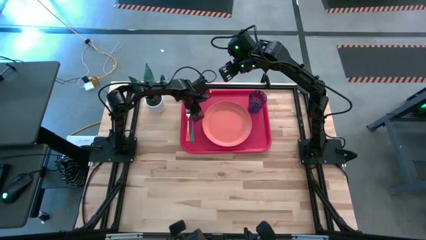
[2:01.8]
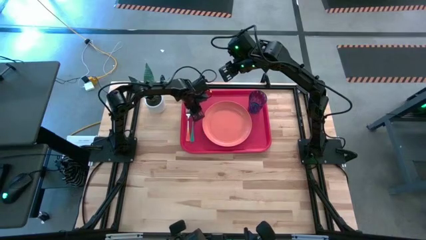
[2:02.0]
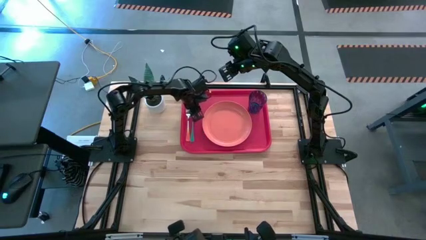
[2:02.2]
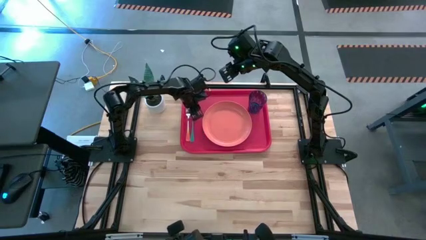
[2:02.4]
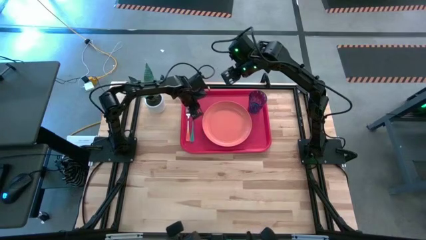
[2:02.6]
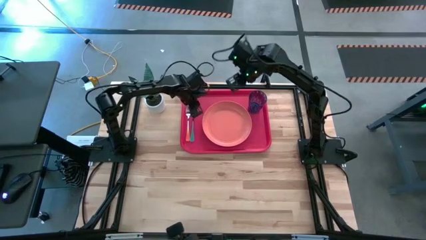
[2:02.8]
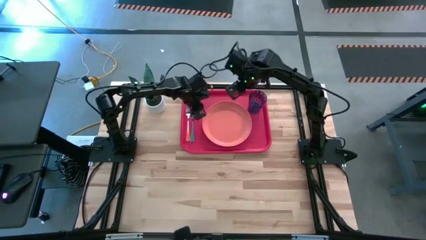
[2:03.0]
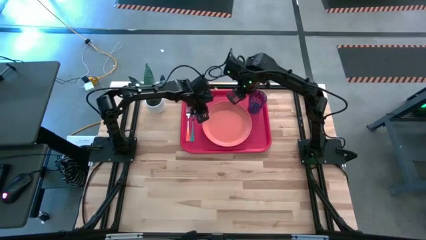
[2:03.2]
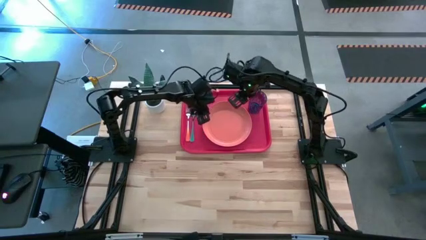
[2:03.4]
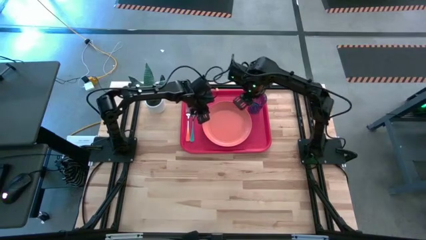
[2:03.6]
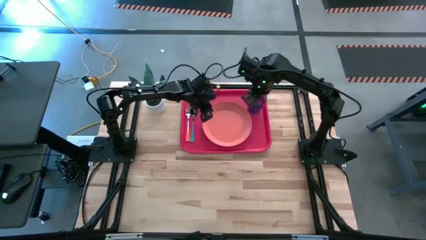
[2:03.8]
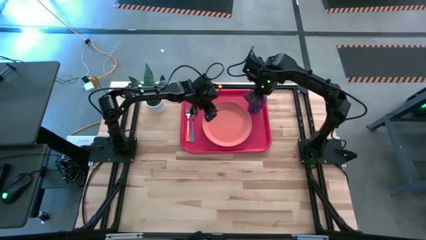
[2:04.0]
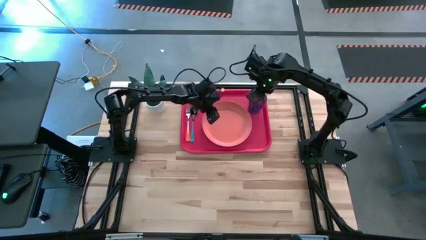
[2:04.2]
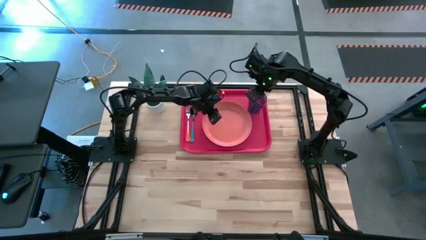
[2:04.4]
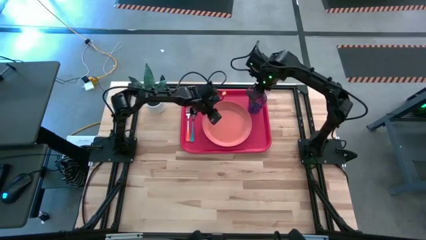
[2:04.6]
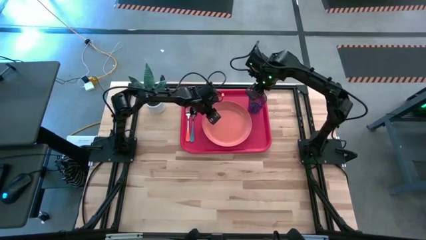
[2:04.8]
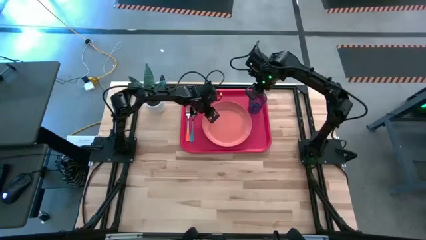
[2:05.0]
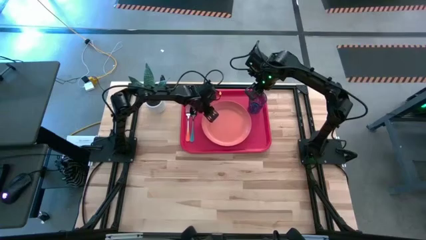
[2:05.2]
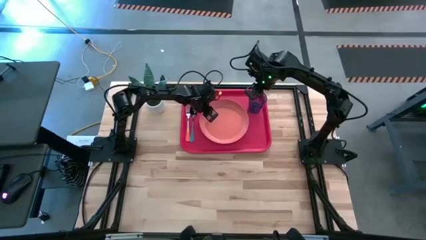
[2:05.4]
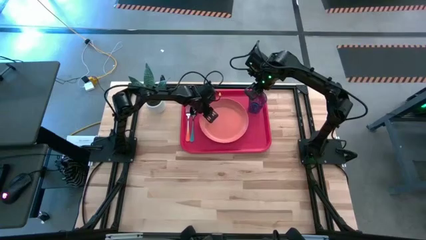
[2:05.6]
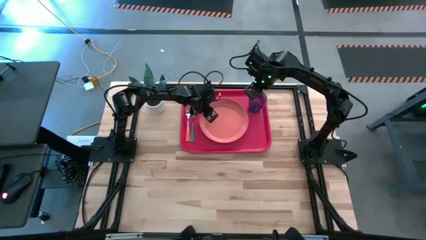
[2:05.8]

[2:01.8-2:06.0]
Task: Pick and place plate/cup/fork/spoon on tray
Adjust the orange plate on the pink tray

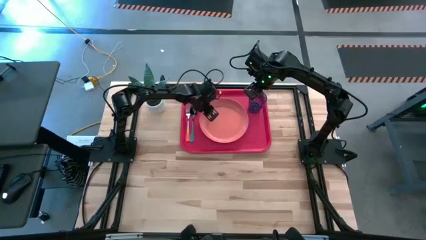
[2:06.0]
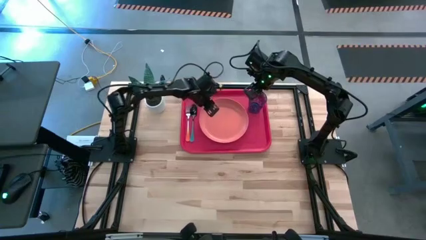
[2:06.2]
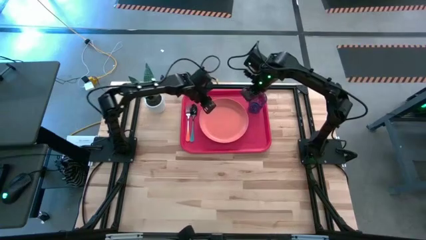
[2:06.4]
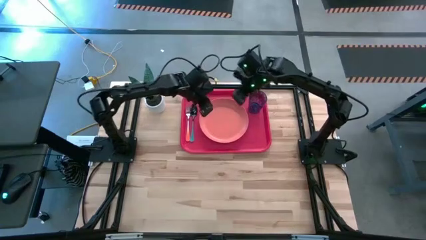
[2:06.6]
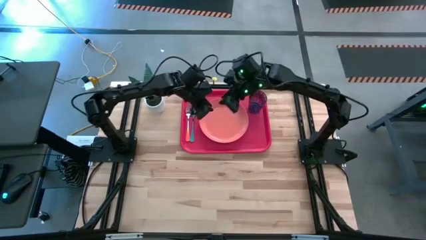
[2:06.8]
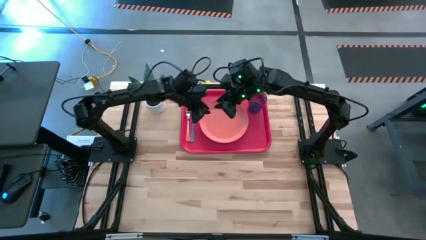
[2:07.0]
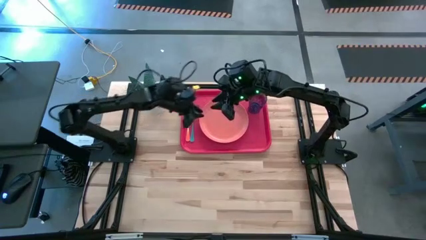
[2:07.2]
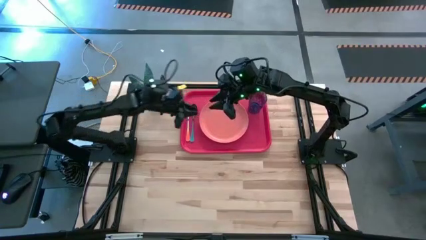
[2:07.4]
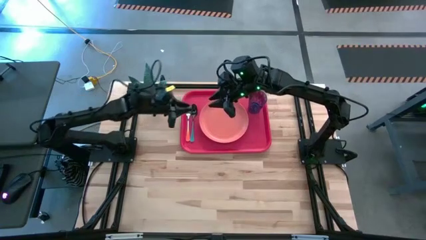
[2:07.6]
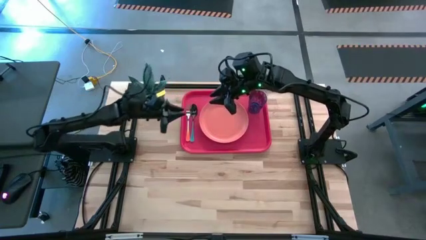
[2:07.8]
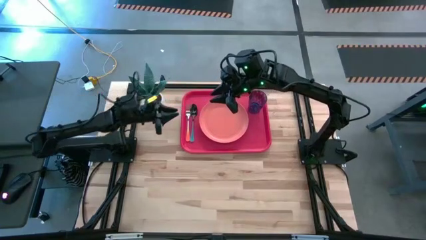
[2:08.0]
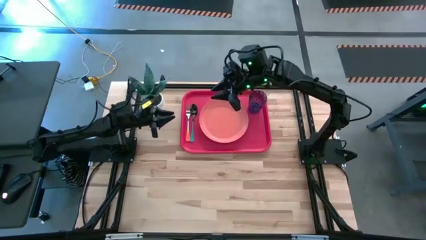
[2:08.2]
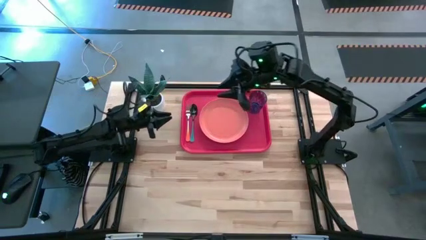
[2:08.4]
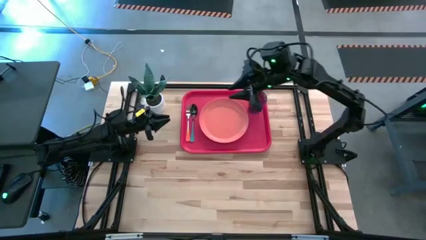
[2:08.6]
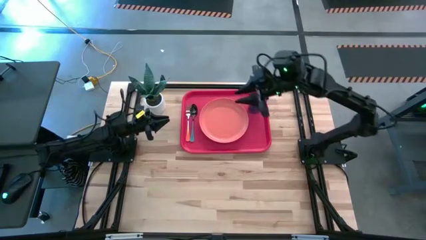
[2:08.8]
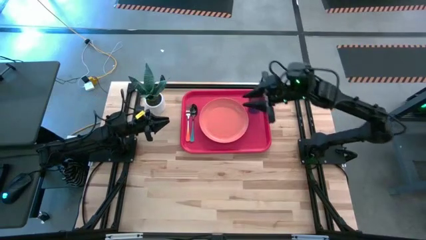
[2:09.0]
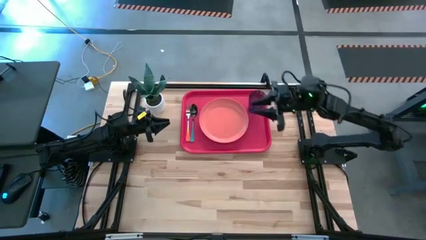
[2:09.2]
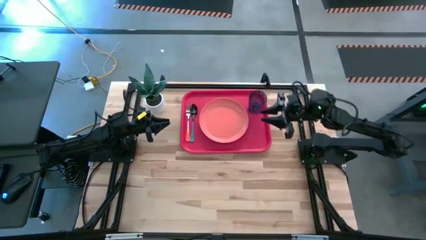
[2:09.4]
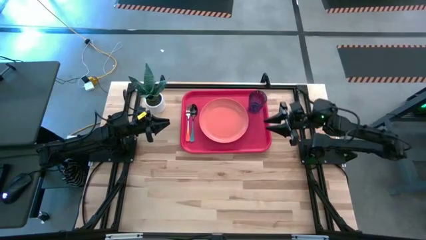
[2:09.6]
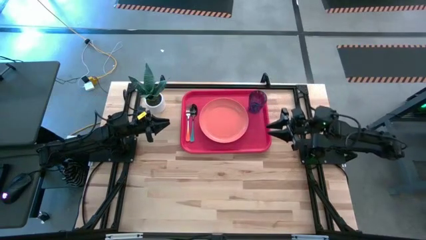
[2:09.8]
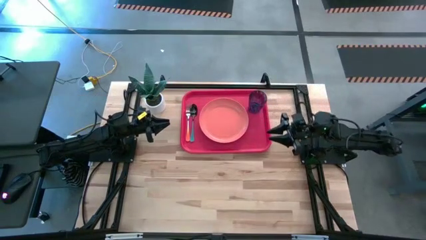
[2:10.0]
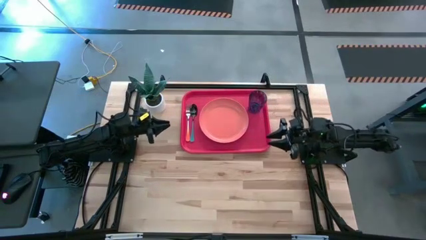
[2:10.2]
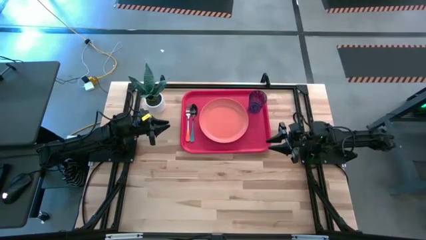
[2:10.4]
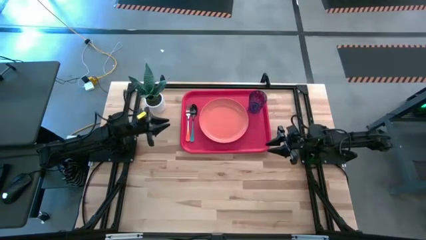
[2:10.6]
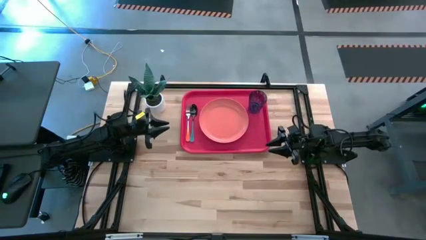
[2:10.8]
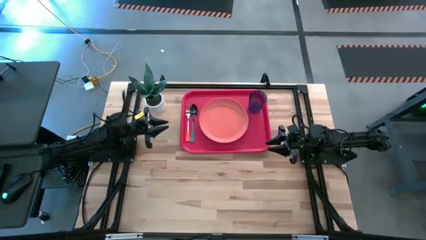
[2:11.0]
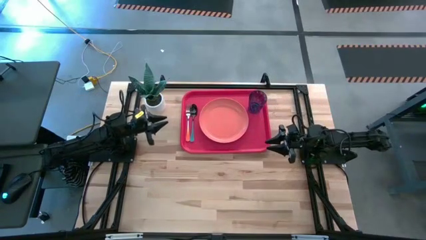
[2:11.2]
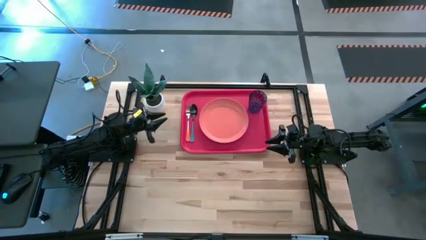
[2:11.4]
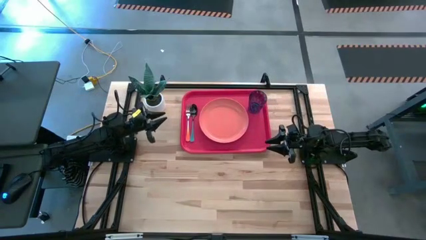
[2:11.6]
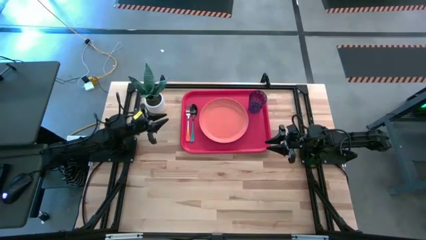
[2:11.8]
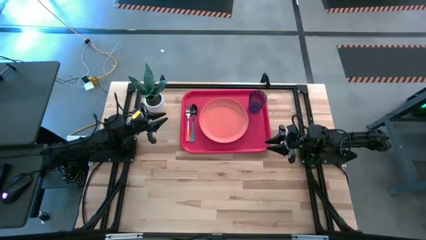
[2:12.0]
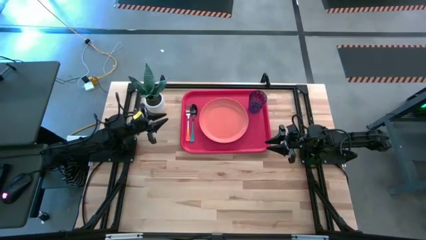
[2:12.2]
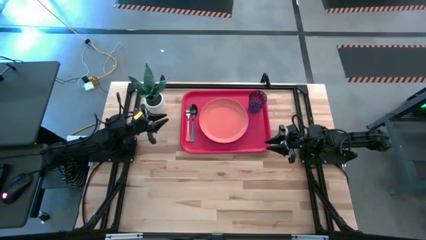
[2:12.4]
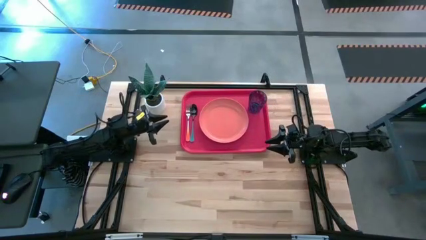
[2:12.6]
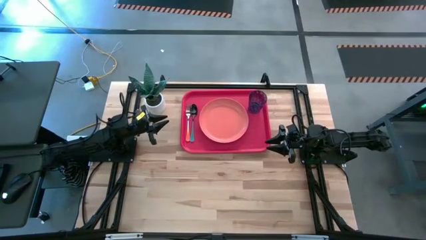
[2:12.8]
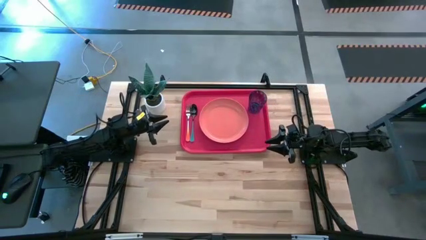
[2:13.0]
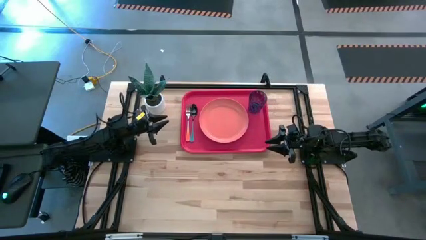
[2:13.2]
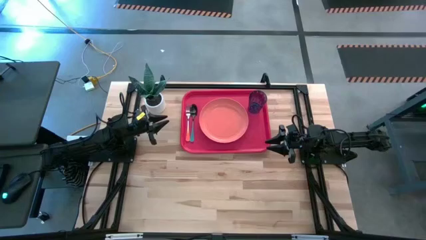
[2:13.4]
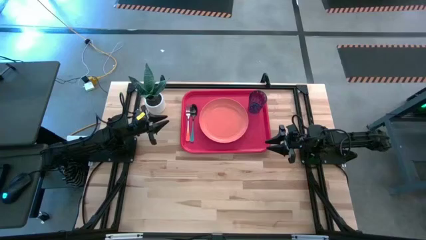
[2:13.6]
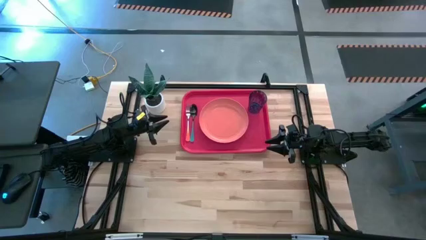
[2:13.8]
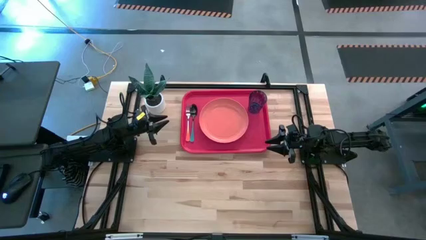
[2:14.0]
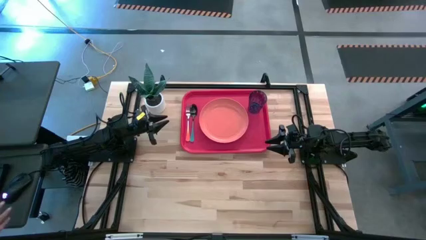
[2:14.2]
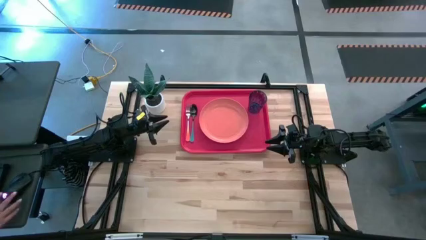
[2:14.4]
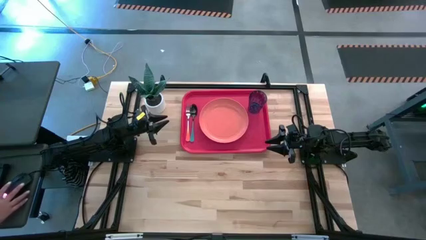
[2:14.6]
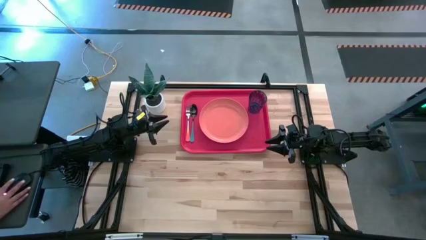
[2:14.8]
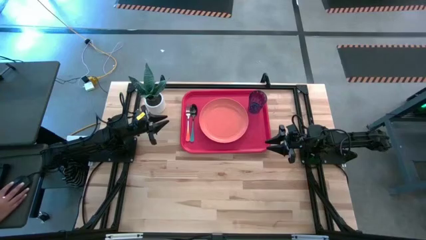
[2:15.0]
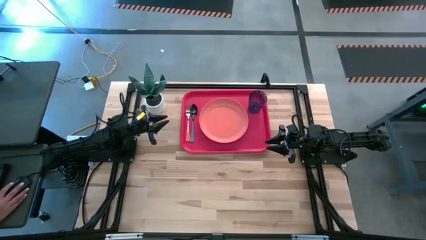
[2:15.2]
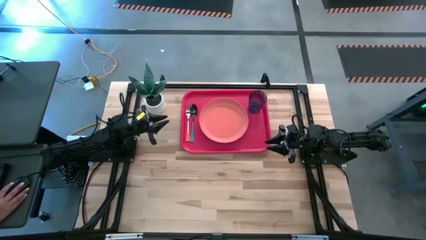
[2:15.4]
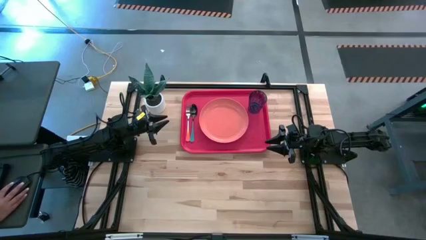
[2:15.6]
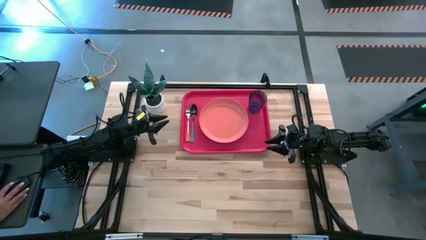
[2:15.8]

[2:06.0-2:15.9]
Return to Home Position

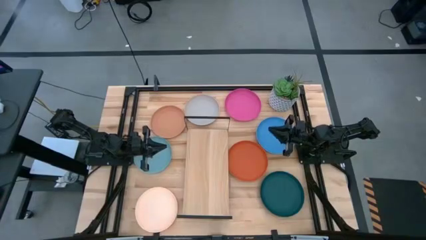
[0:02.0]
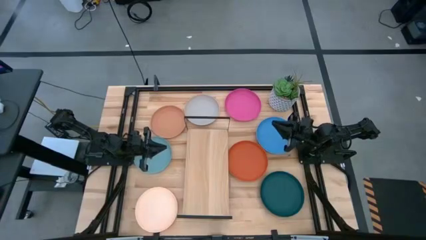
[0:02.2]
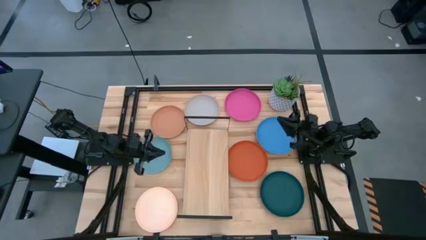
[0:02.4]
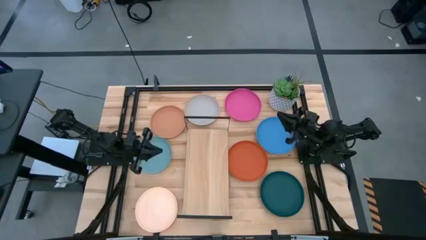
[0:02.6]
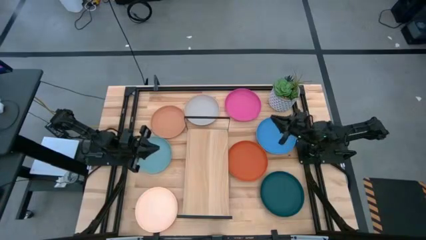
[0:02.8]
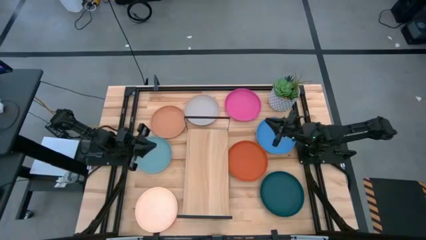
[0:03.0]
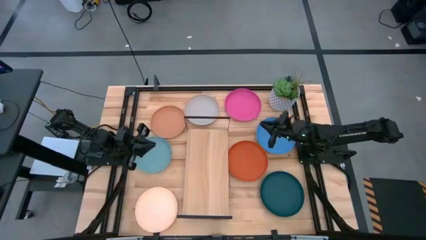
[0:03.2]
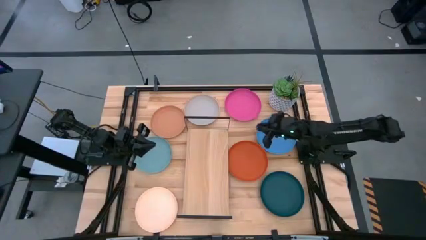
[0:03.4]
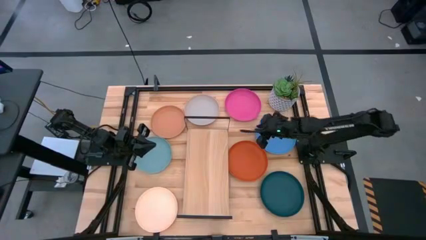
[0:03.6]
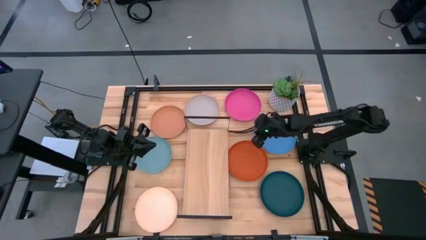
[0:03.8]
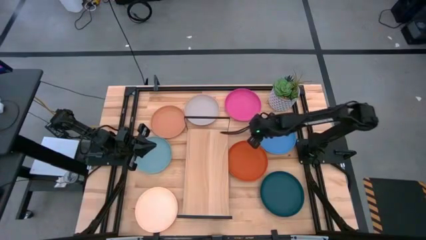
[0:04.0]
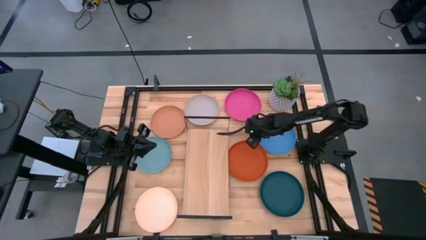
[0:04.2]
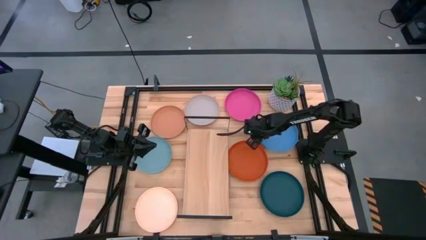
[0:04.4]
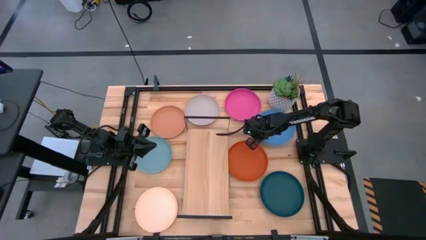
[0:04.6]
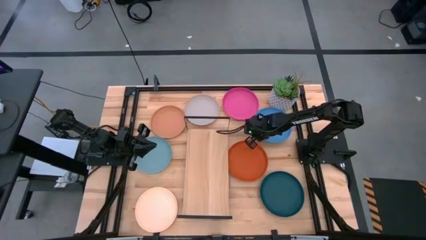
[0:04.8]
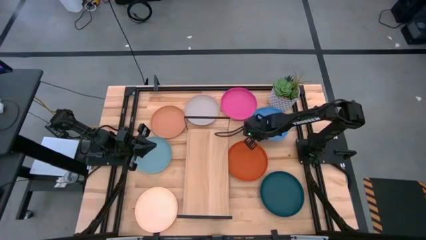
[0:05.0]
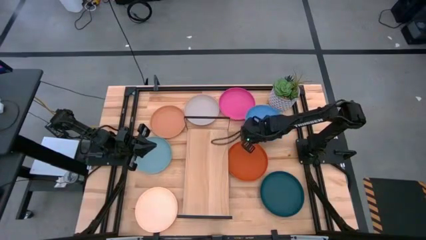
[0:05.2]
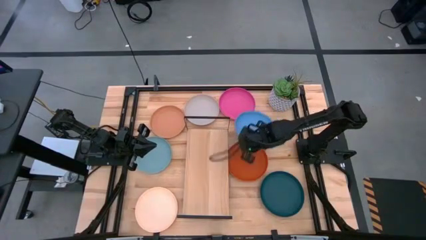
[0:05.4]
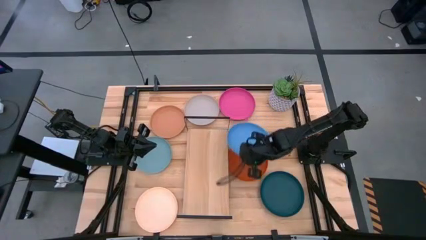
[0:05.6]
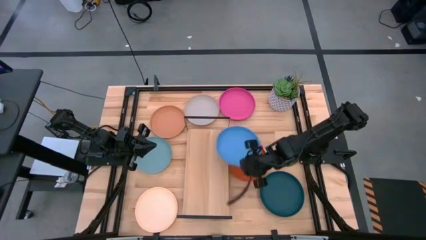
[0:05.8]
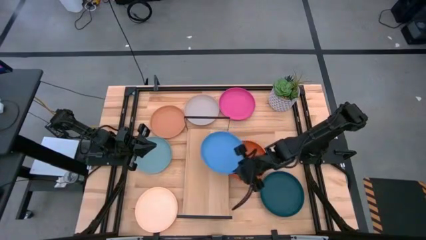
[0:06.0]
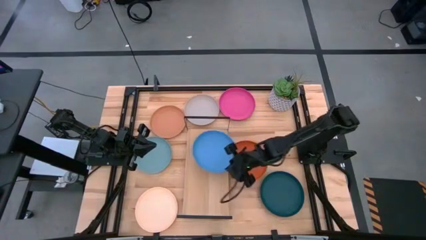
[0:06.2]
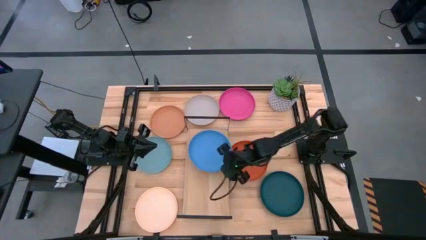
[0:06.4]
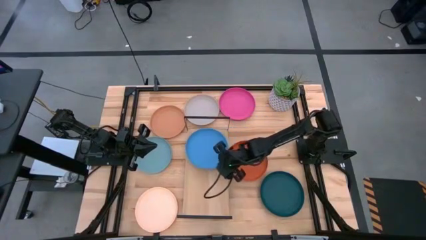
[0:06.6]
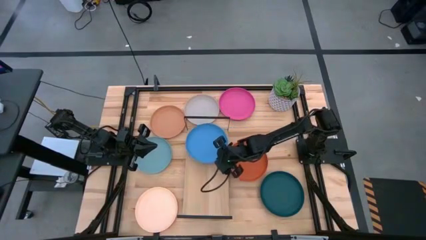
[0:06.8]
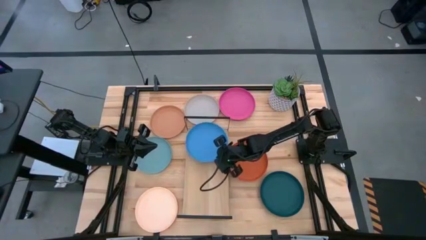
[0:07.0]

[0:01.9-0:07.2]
Task: Place and stack plates onto a shelf
Put the blue plate on the shelf
